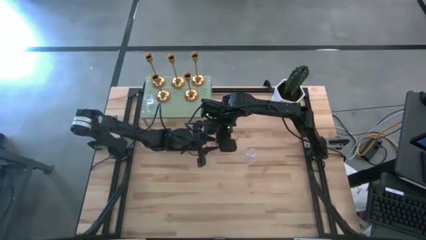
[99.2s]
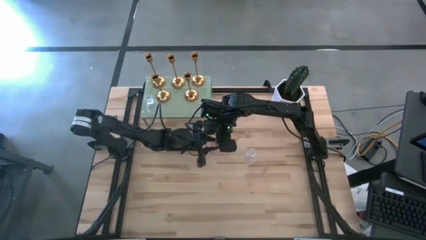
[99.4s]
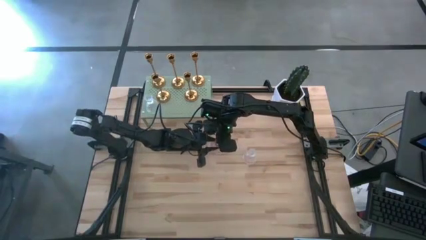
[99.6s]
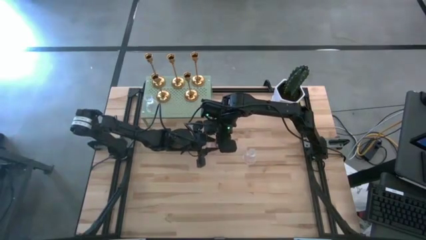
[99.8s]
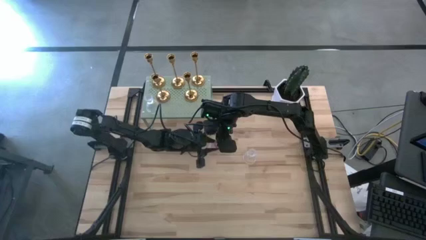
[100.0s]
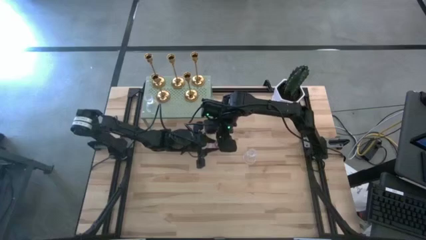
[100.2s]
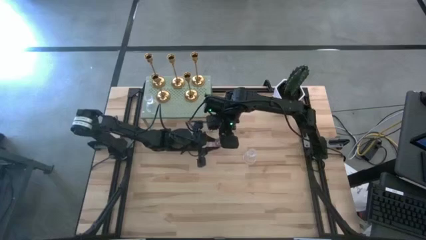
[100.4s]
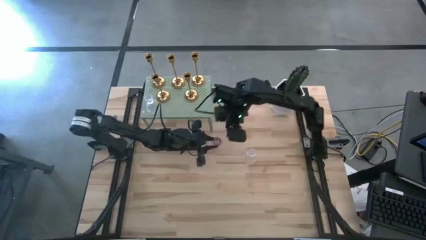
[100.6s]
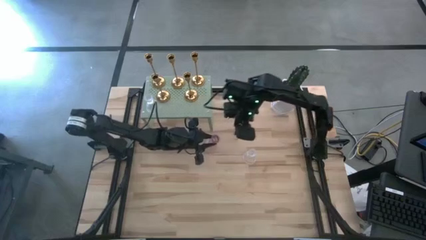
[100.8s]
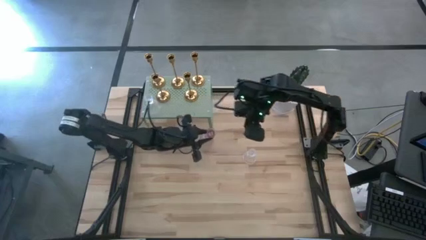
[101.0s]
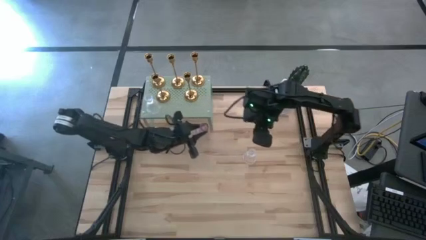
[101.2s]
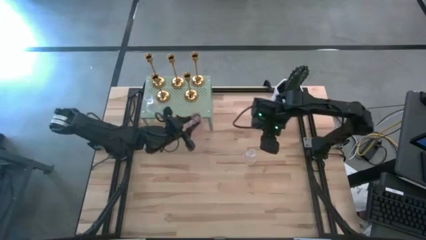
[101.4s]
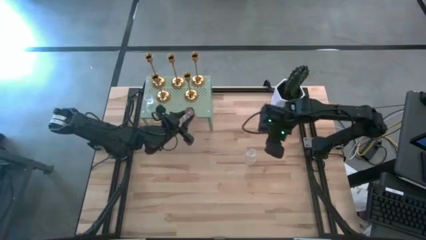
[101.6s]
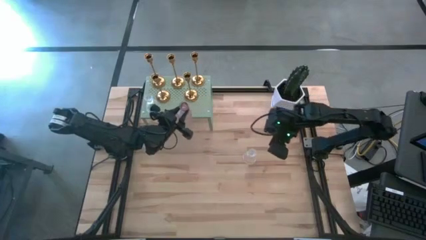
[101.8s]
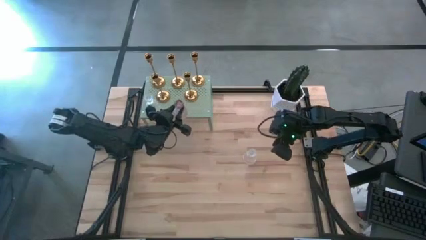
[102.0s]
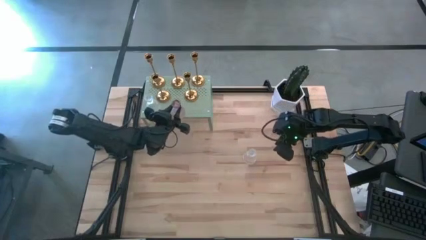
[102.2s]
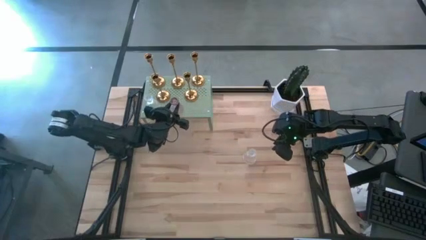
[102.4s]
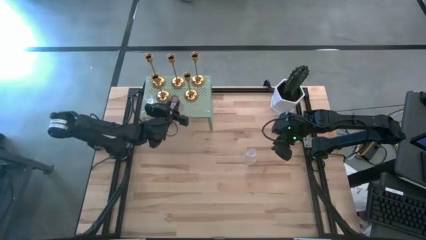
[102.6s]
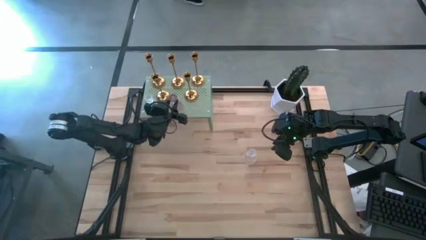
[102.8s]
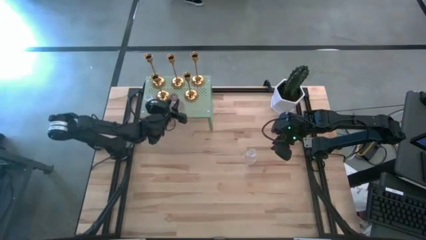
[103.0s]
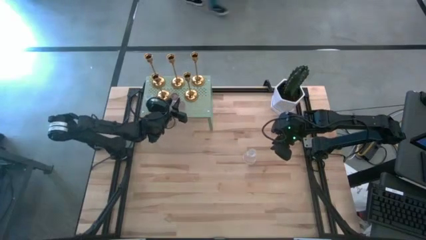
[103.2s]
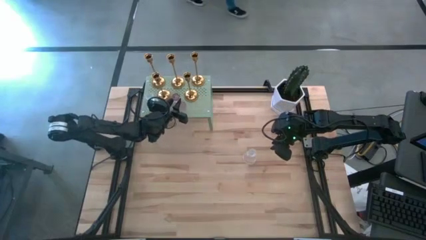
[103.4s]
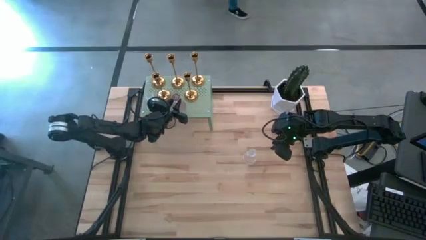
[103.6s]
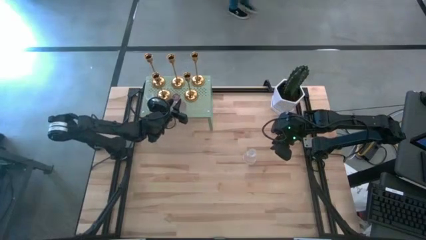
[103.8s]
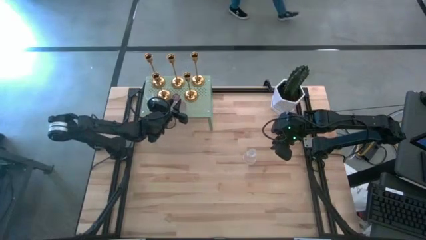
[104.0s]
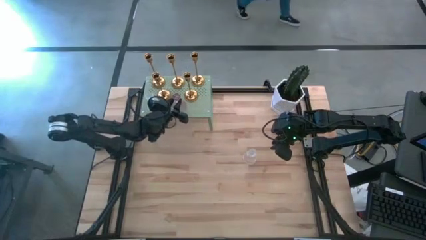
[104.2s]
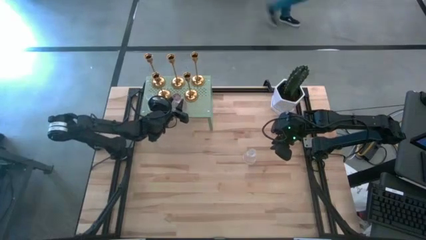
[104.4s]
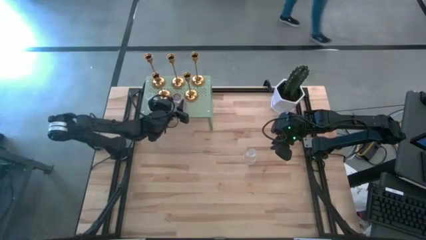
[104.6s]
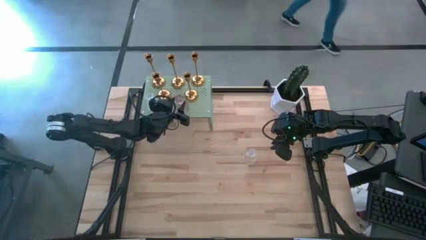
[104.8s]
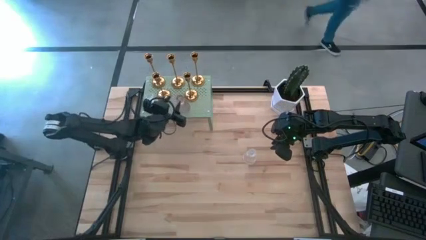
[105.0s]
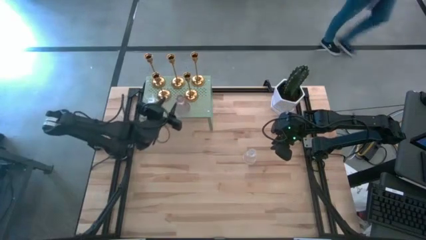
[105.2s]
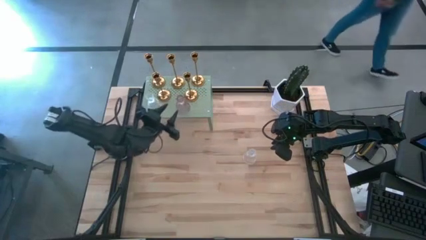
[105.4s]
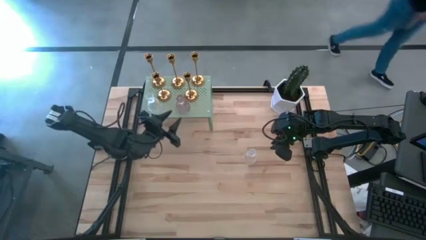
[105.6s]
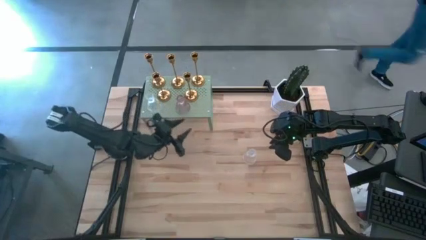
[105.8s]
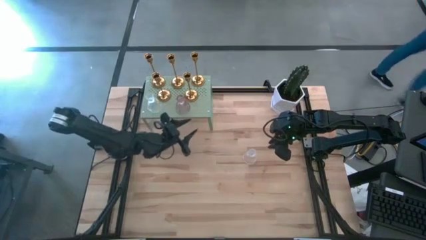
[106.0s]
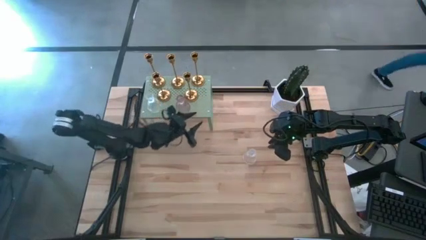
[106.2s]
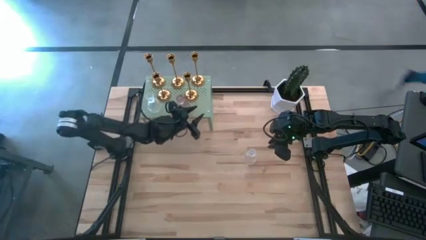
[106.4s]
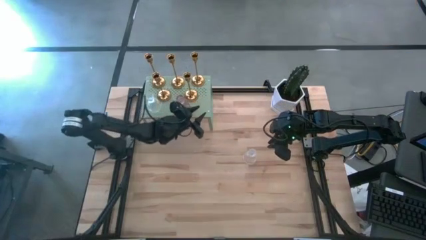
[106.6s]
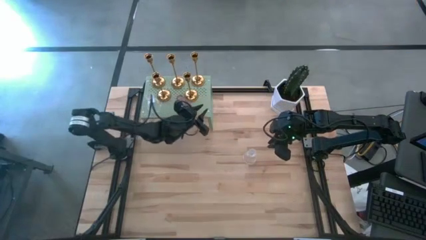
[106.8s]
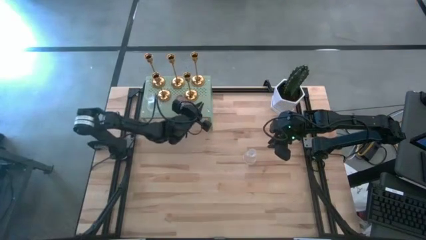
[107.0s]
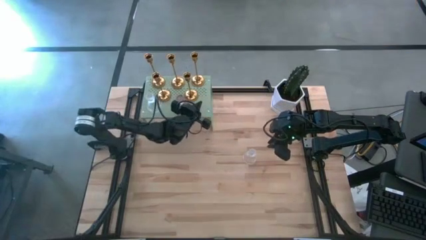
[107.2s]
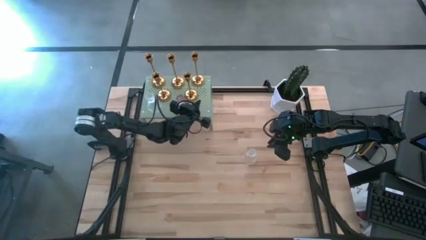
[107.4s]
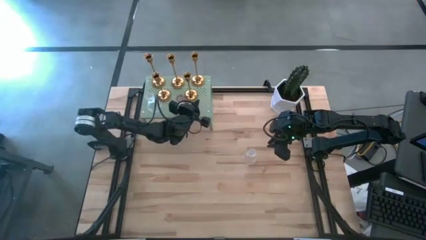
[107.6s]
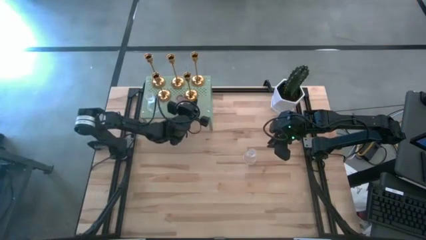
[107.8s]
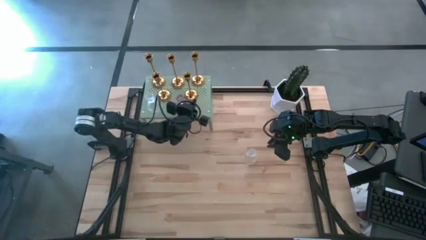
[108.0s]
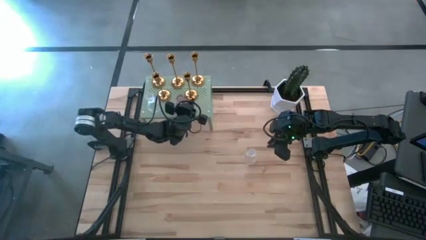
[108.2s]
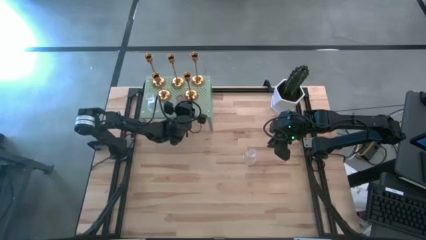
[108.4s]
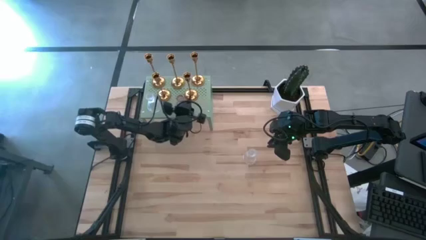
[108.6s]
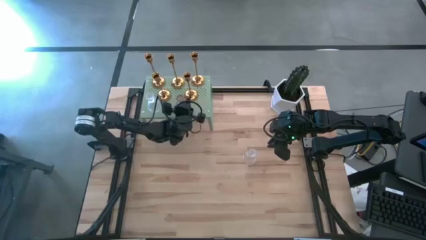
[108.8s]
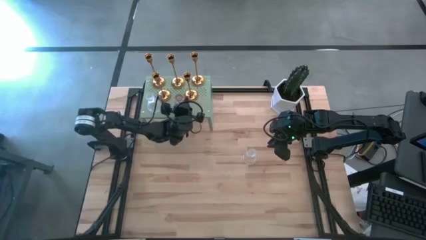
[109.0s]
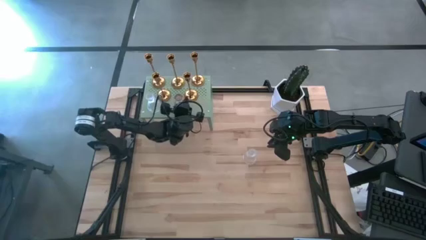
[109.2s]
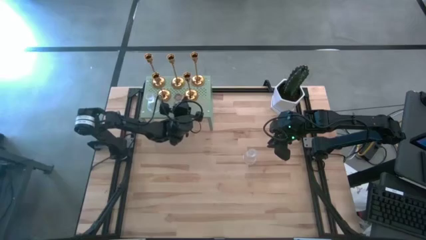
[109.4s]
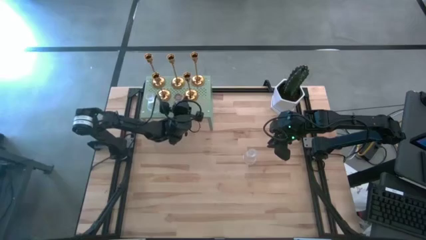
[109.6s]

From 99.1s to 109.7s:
Task: Pick & Place candle stick holders
Put the purple glass candle holder on the shelf
